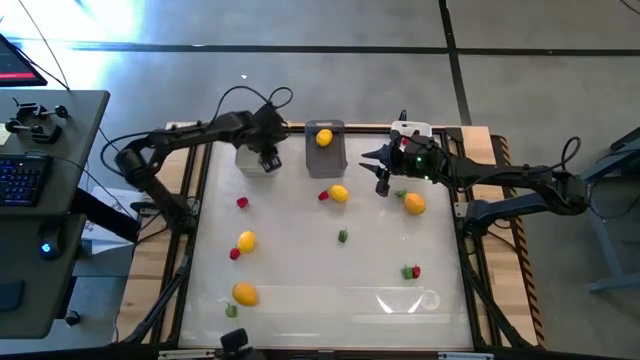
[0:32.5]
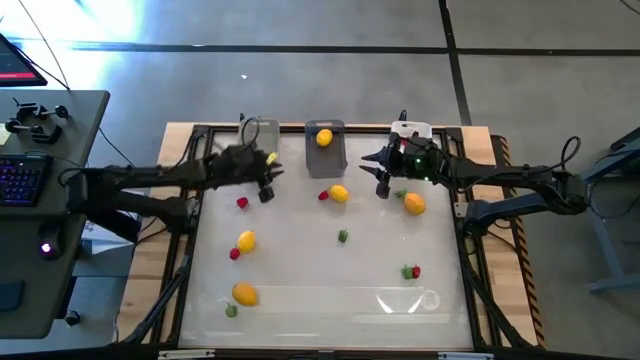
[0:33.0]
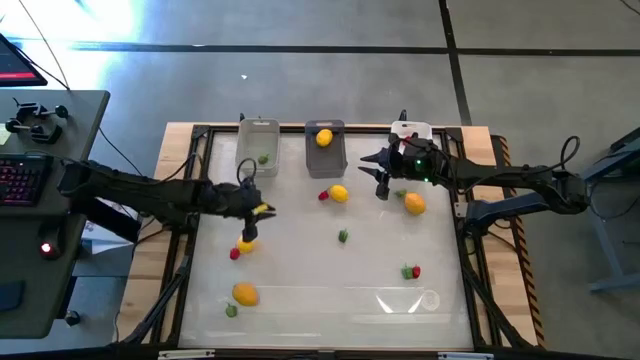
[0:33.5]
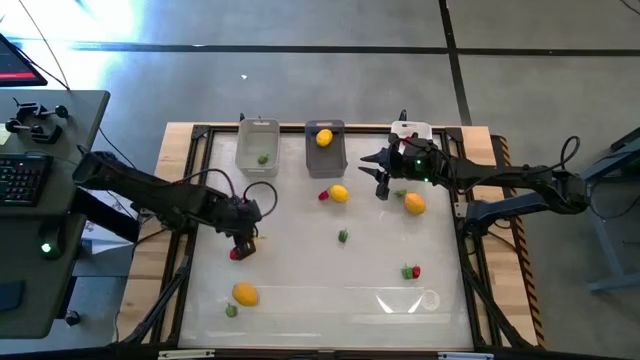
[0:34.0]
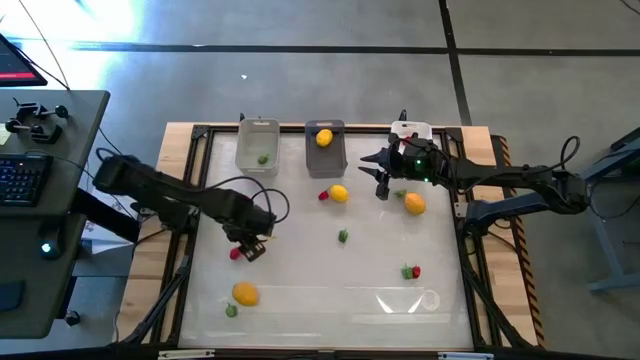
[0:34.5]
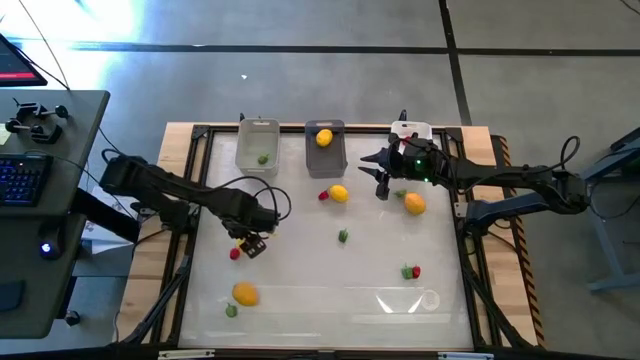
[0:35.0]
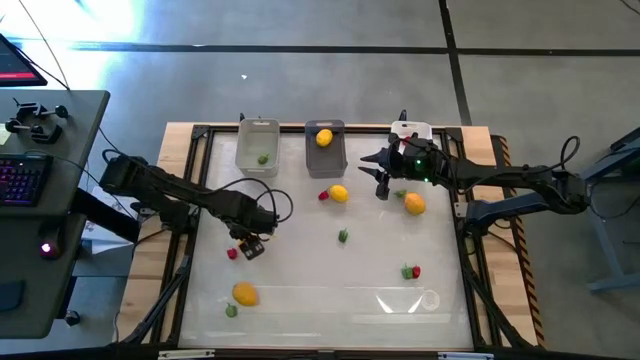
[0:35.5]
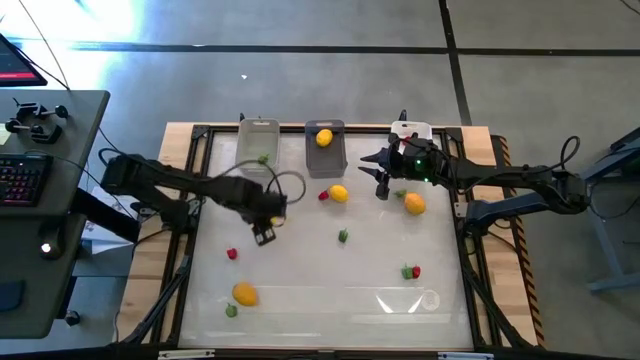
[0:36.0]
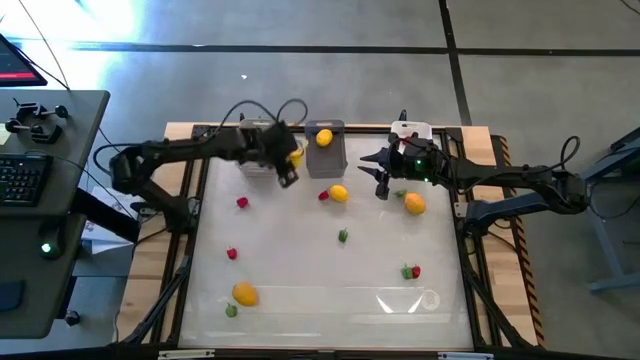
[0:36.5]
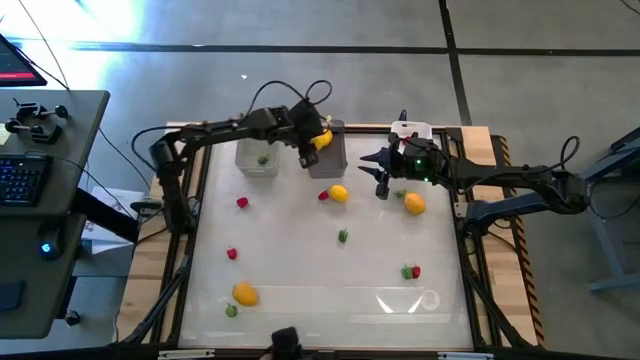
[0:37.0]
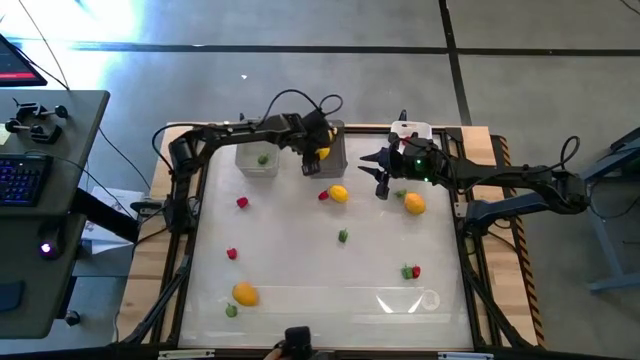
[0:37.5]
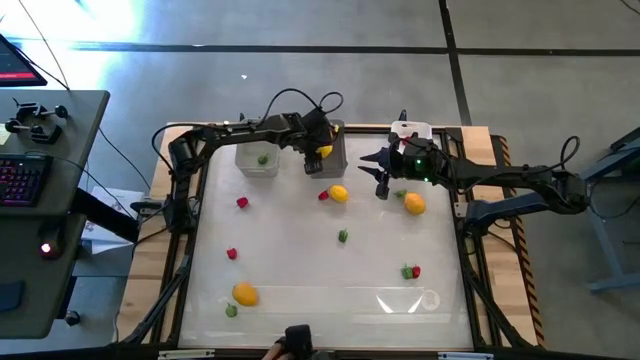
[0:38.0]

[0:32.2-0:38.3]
Task: Sort produce into baskets
Put the lemon into the black bin

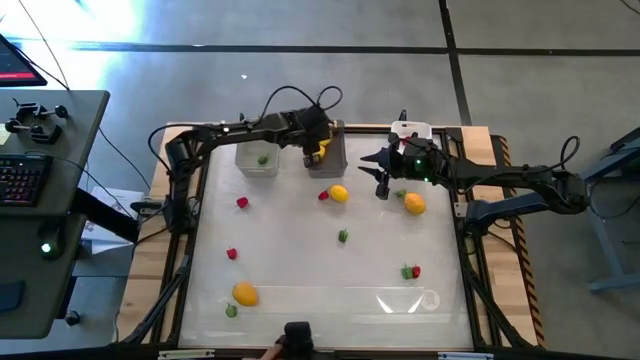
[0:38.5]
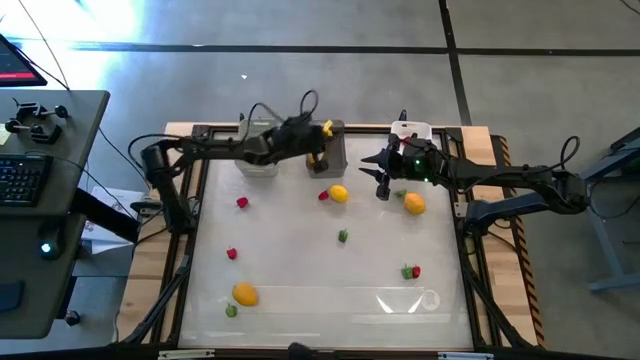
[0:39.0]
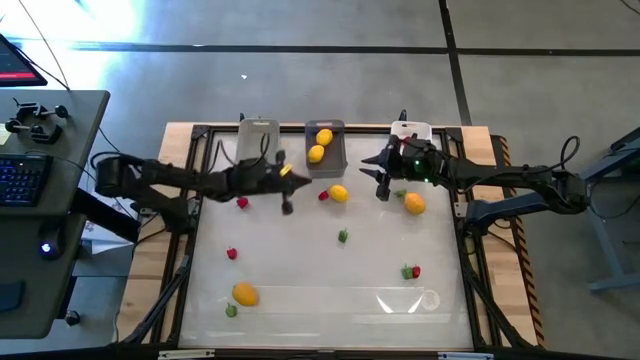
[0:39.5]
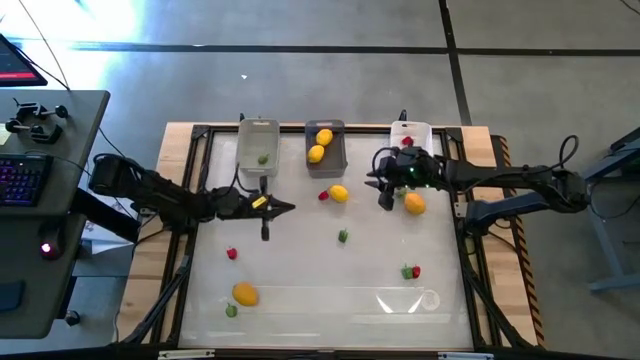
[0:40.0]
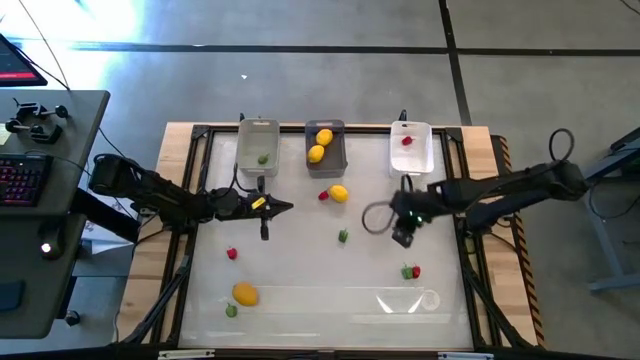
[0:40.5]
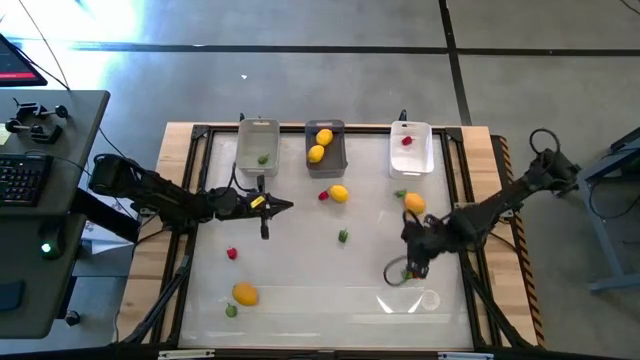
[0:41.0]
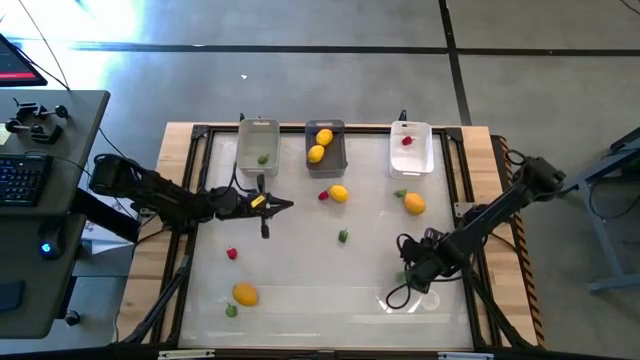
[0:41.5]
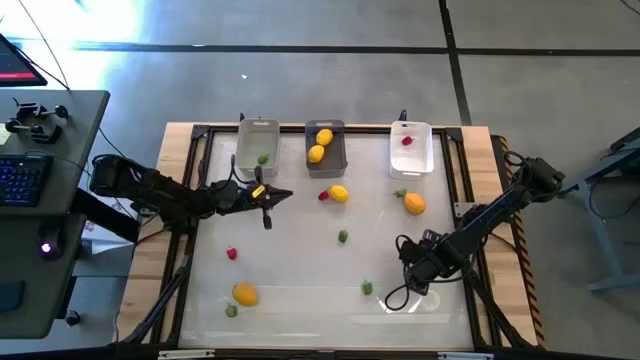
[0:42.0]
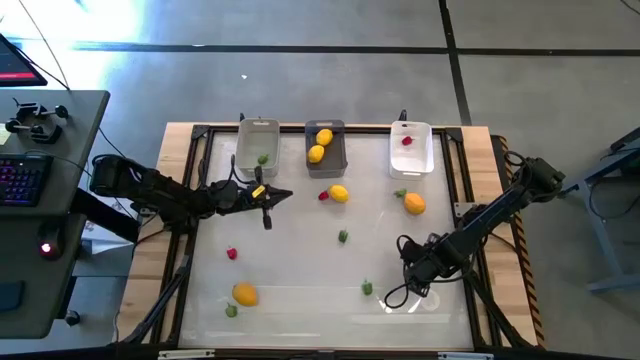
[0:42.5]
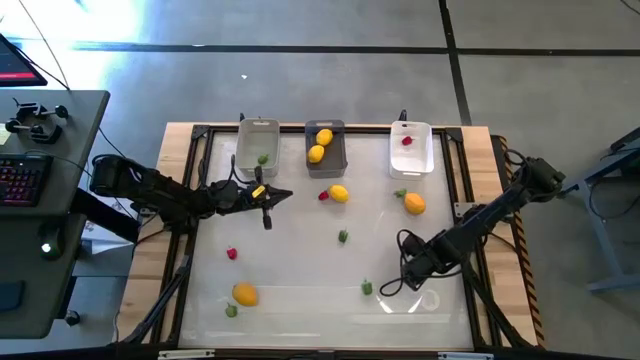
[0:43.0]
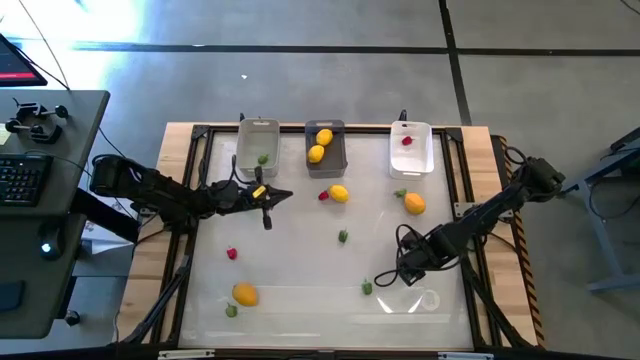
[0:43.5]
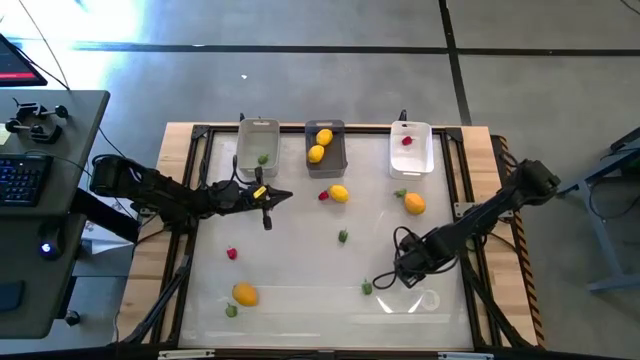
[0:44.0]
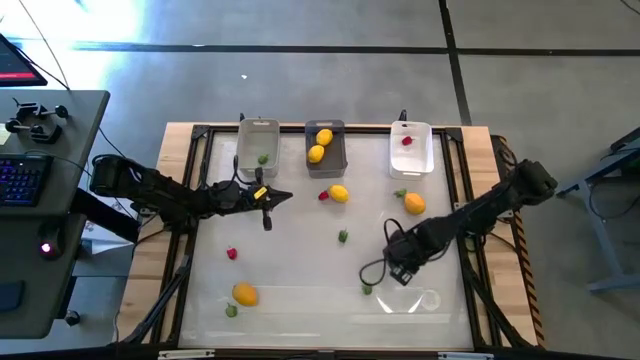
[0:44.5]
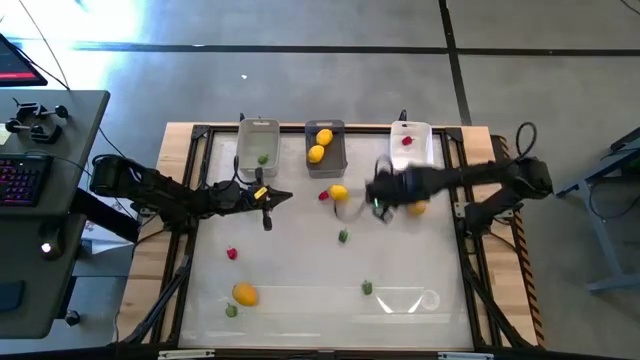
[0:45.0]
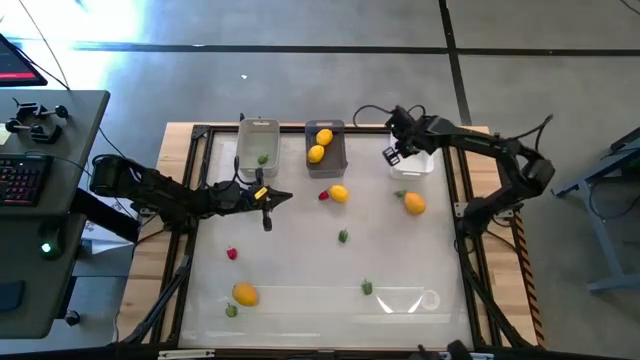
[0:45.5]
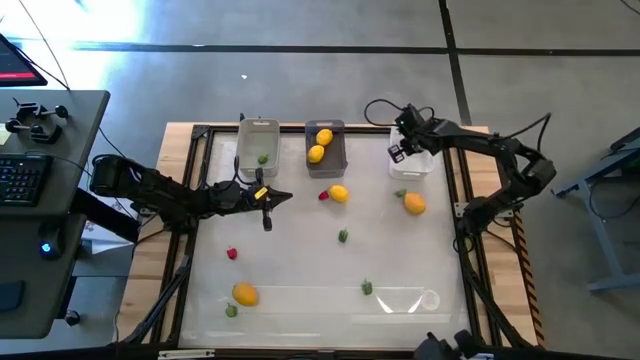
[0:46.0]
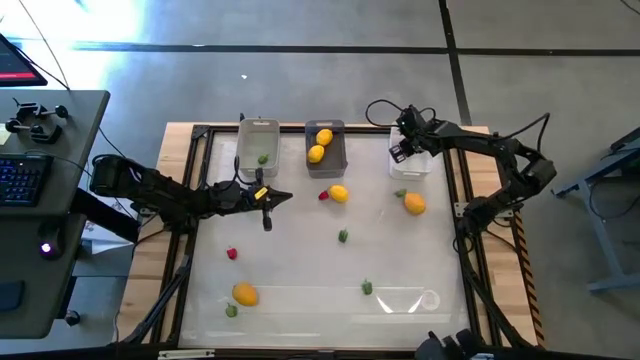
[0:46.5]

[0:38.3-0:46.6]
Put the bottom right red bell pepper into the white bin

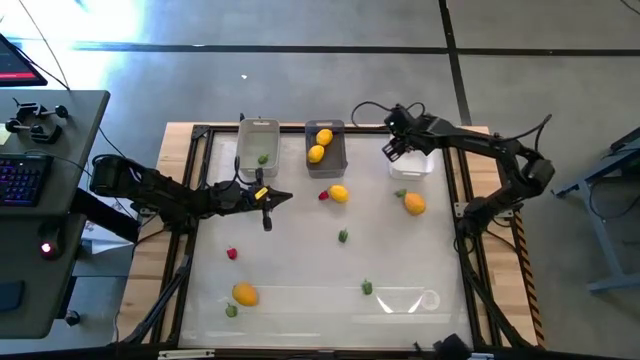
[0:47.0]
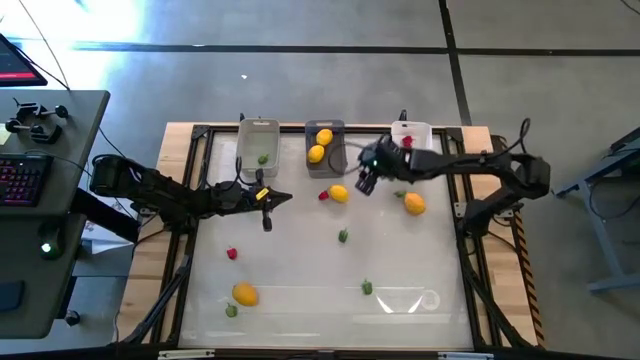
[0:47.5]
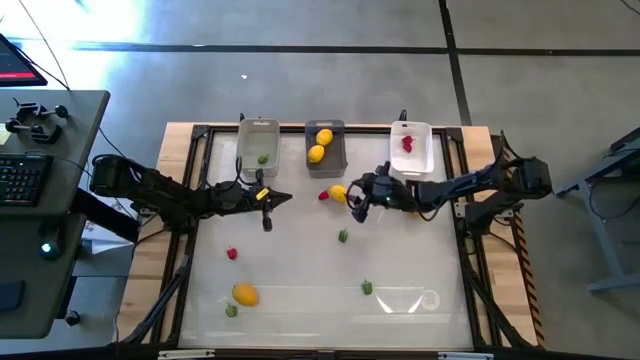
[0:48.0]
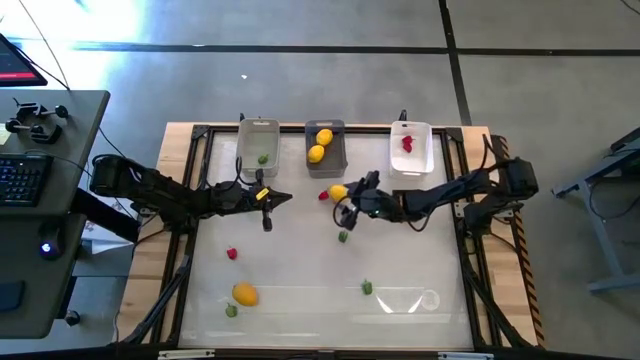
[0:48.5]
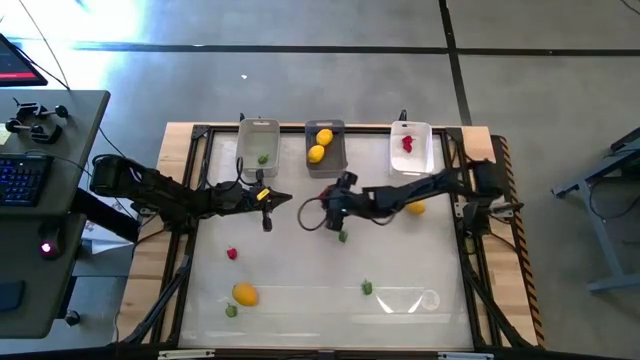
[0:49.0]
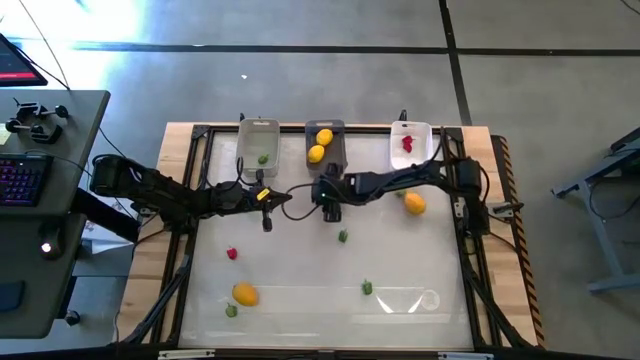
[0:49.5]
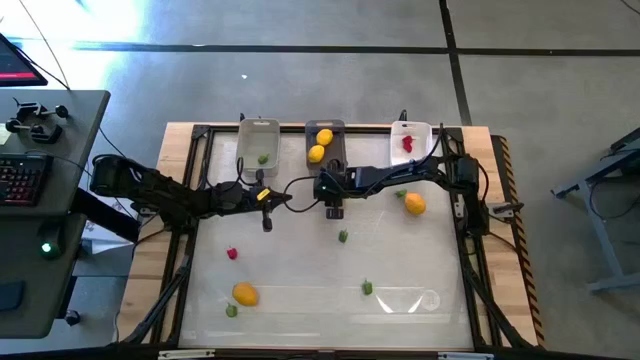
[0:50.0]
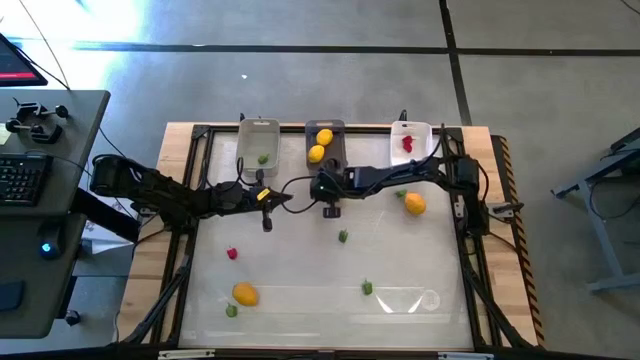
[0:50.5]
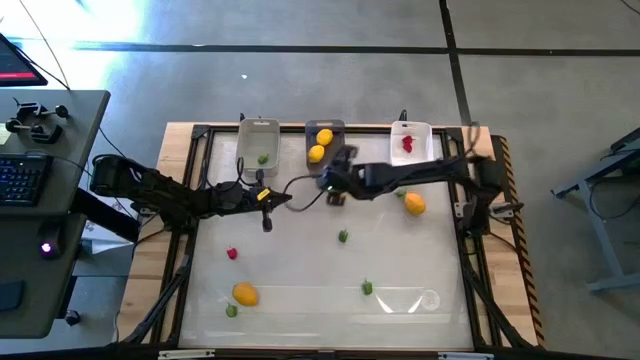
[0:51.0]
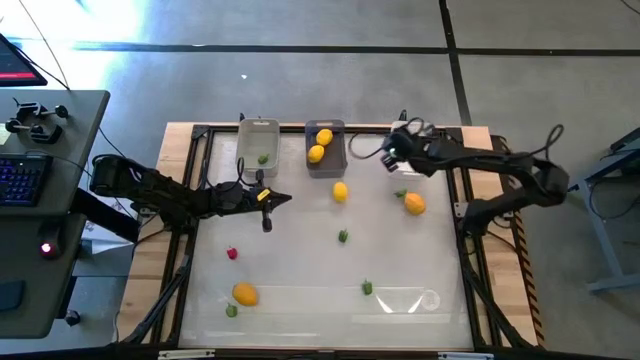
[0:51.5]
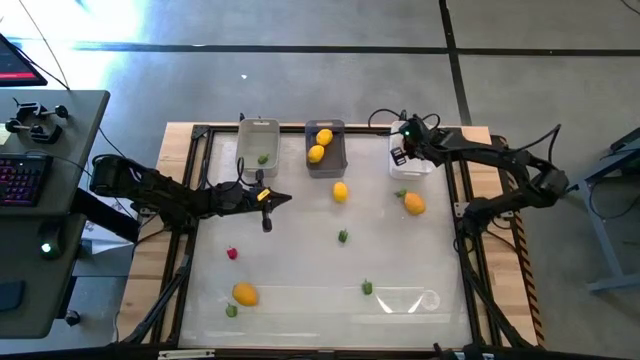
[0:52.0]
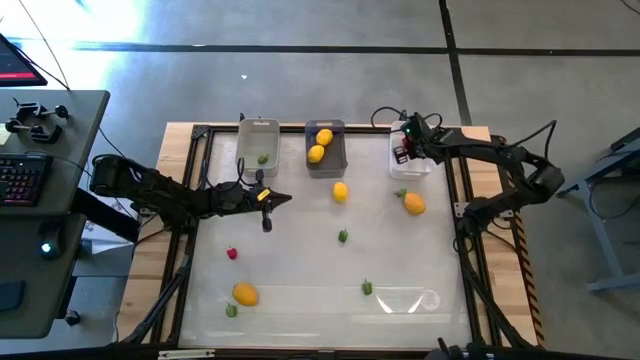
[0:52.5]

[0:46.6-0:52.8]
Put the top right red bell pepper into the white bin
